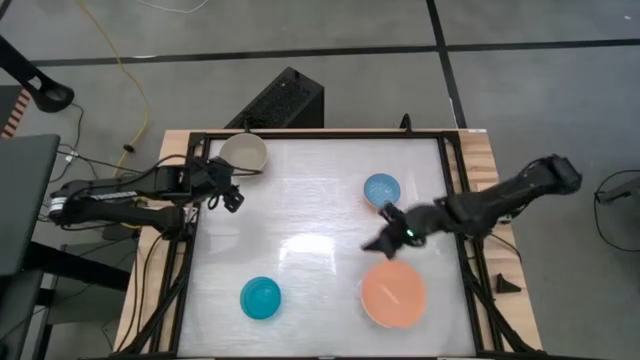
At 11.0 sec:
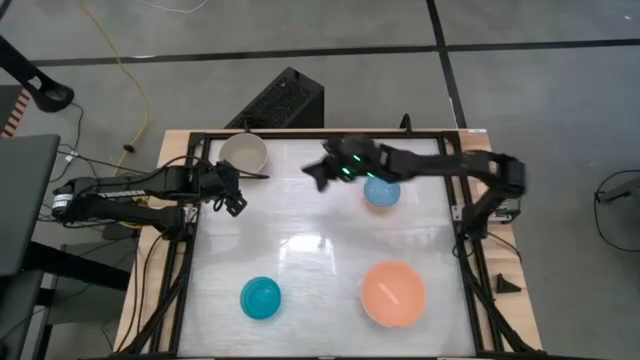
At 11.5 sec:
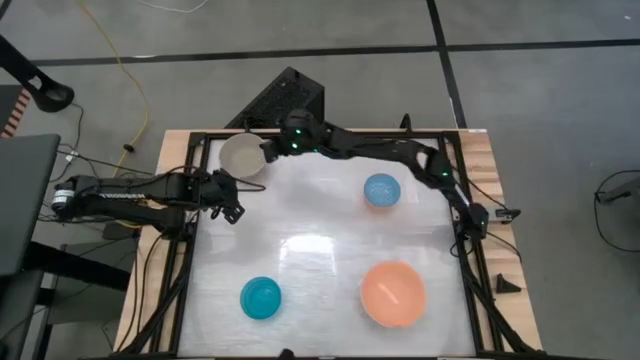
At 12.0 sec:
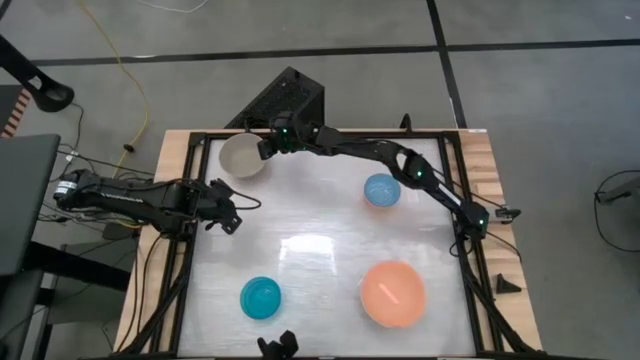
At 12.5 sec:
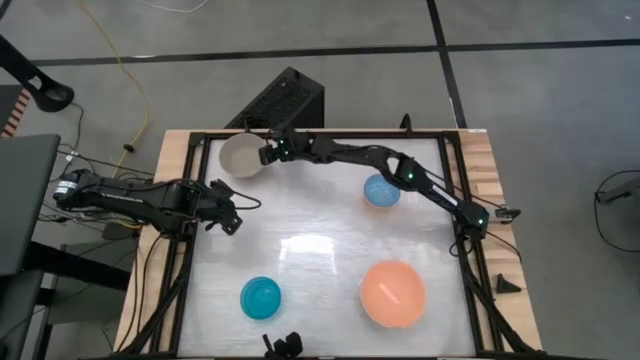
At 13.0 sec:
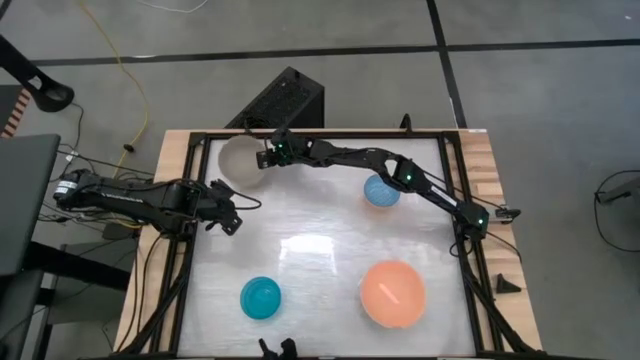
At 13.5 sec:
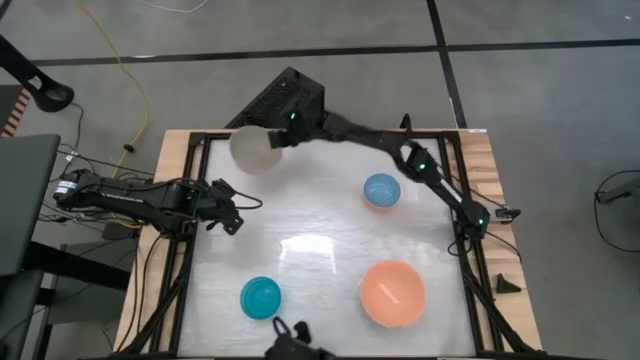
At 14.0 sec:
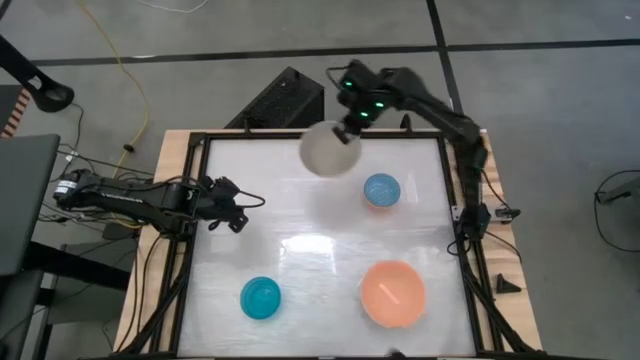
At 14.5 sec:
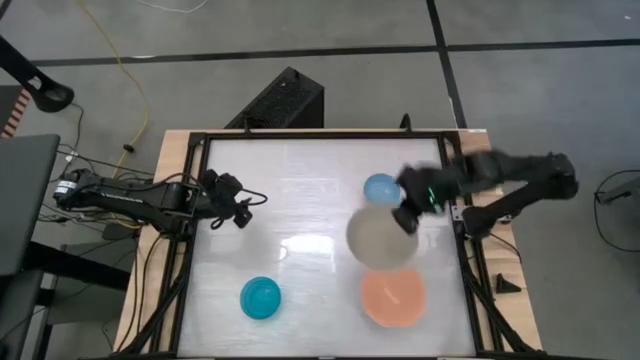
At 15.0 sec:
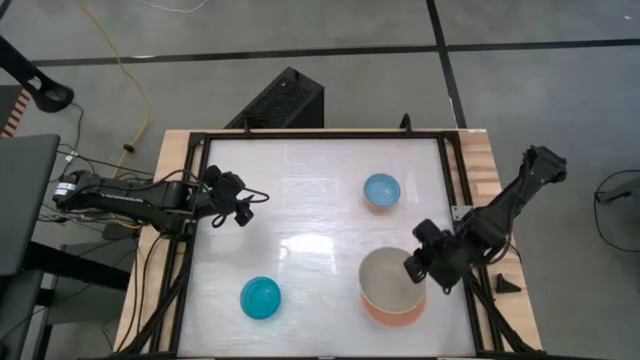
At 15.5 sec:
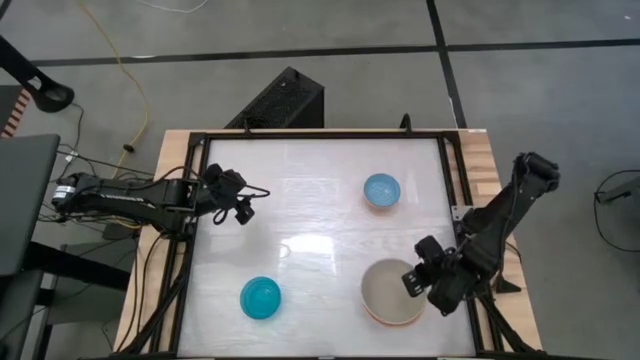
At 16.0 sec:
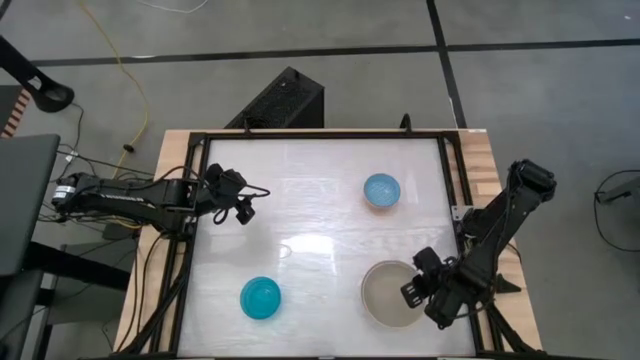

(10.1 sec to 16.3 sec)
Stack the gray bowl on top of the light orange bowl

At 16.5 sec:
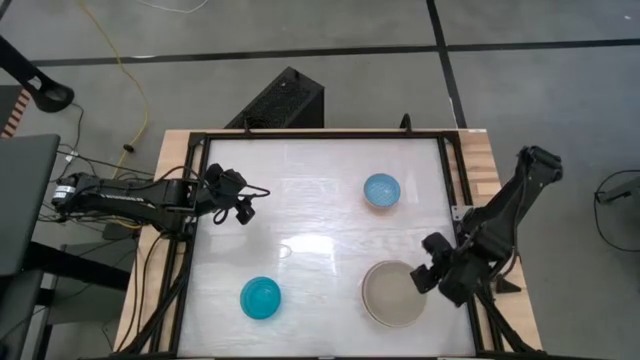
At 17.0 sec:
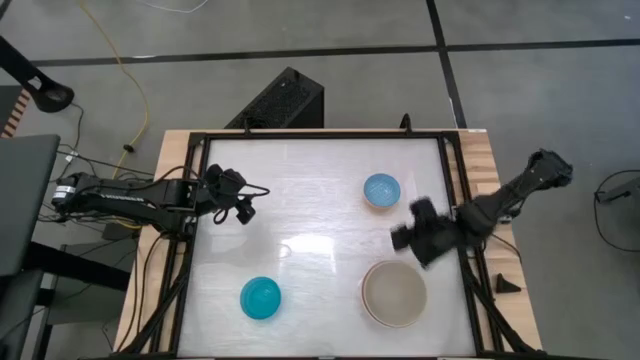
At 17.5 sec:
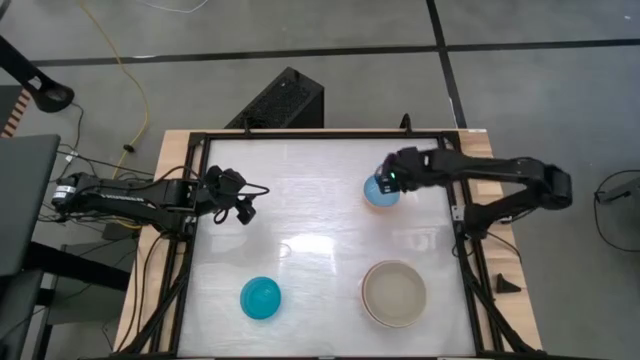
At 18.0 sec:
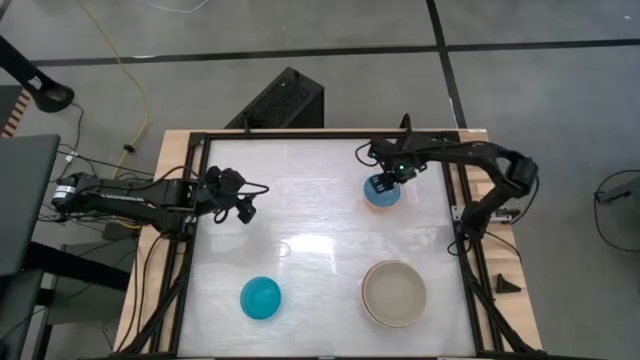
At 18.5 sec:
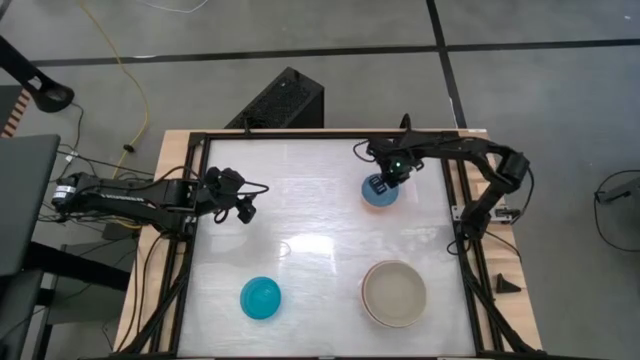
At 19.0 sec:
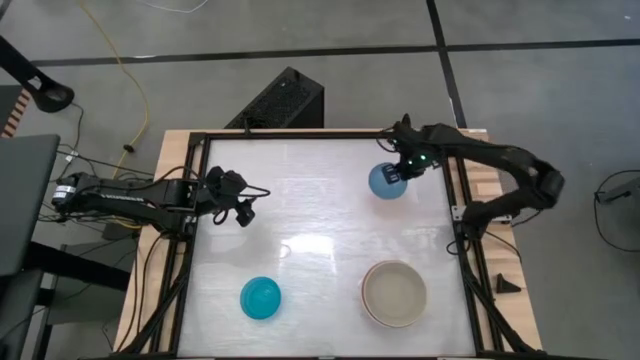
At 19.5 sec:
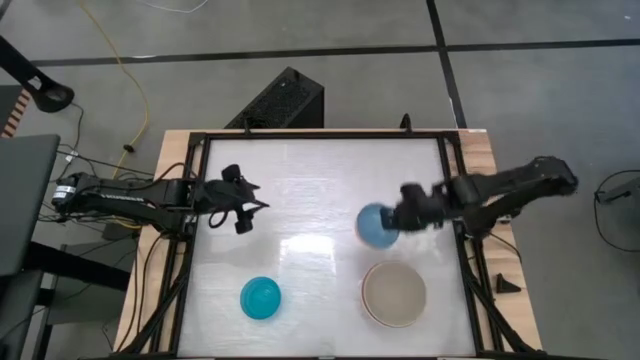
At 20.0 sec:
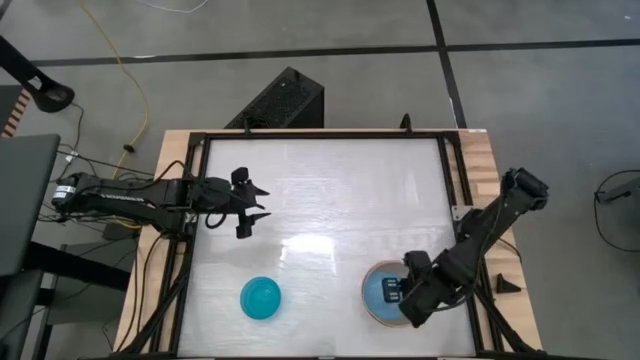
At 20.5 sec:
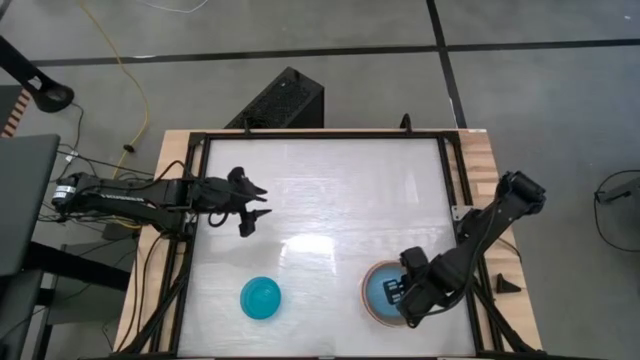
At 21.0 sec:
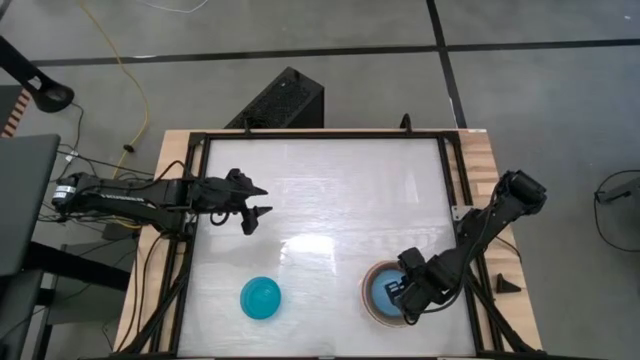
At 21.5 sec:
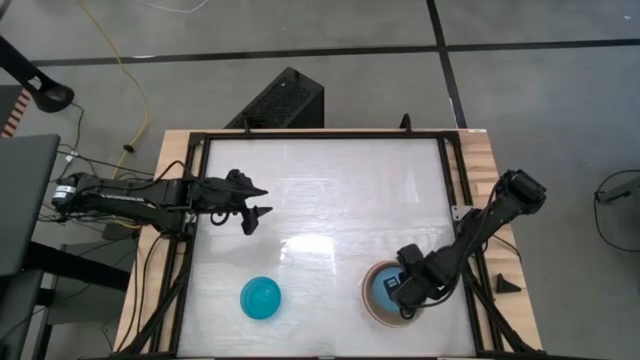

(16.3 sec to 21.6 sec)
Stack the blue patterned bowl on top of the gray bowl

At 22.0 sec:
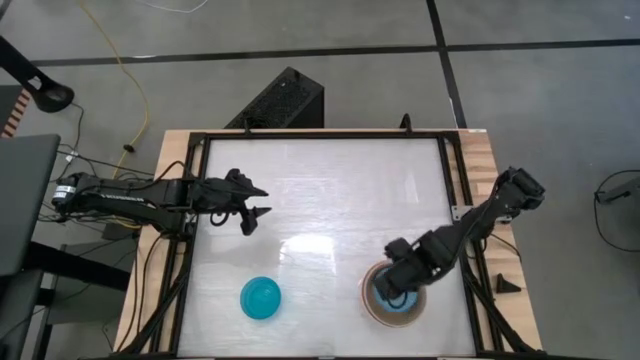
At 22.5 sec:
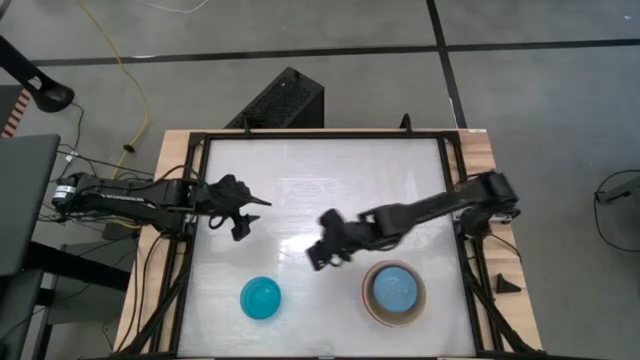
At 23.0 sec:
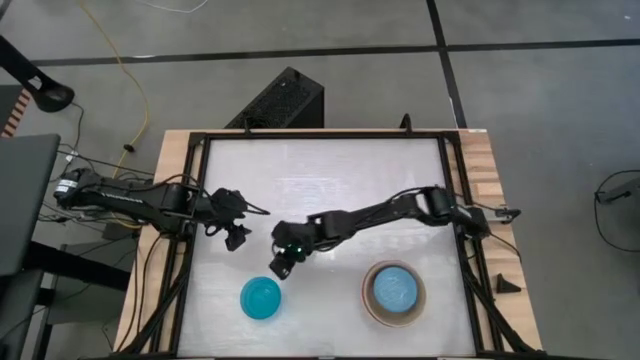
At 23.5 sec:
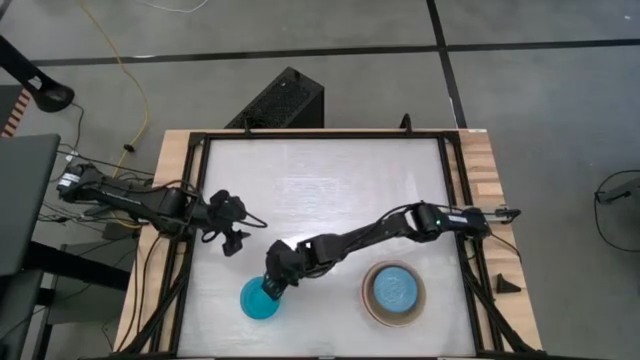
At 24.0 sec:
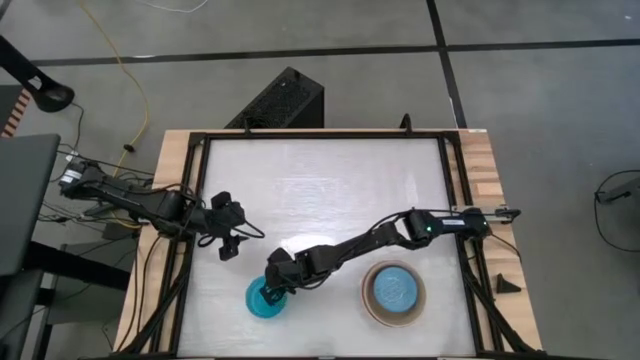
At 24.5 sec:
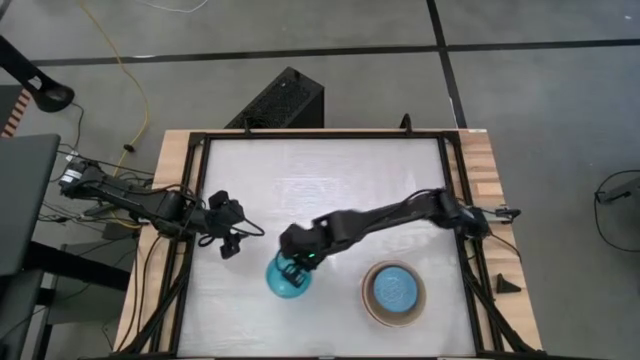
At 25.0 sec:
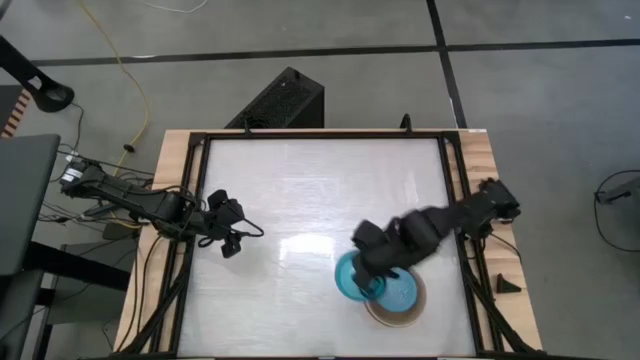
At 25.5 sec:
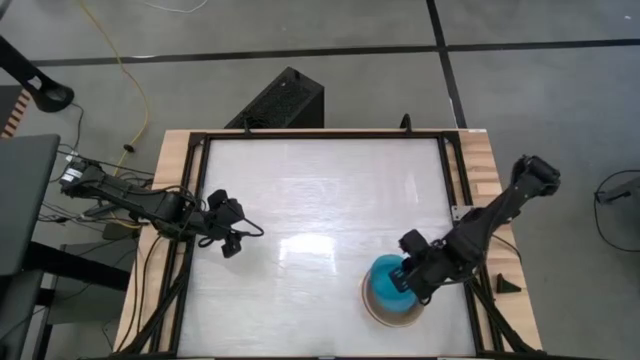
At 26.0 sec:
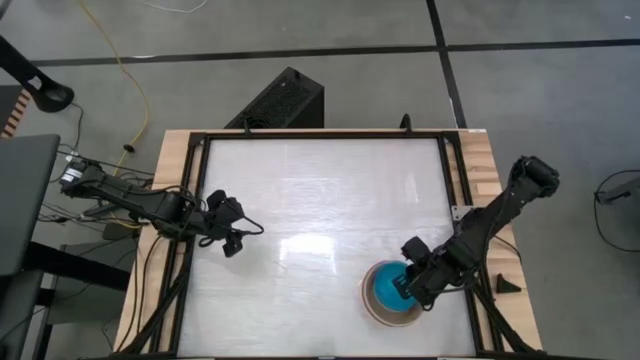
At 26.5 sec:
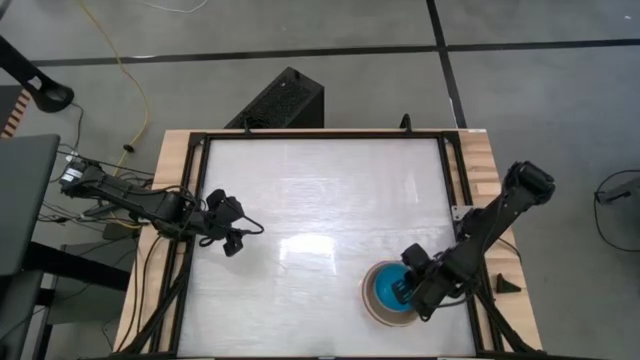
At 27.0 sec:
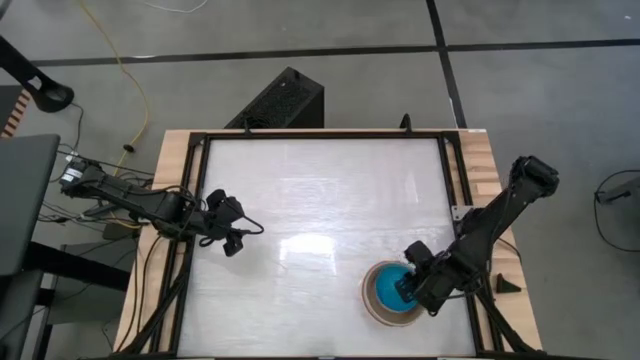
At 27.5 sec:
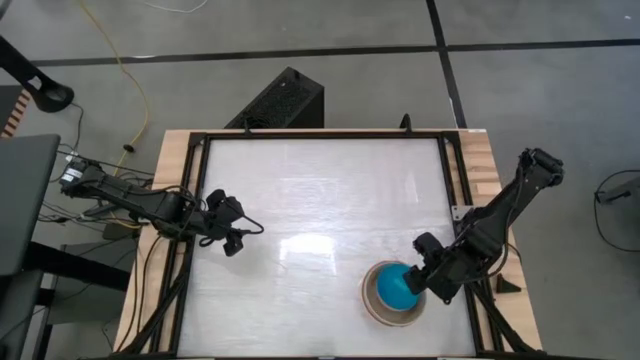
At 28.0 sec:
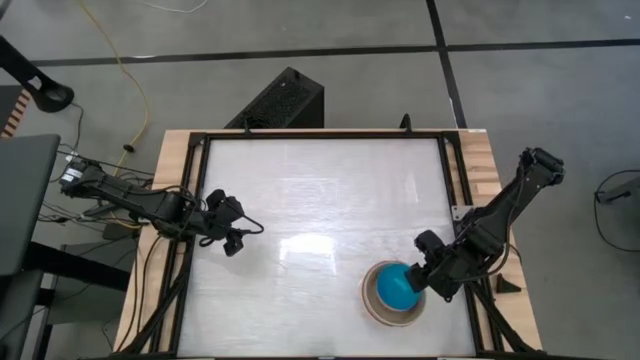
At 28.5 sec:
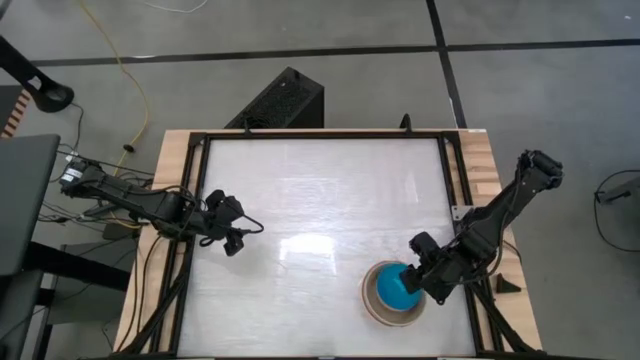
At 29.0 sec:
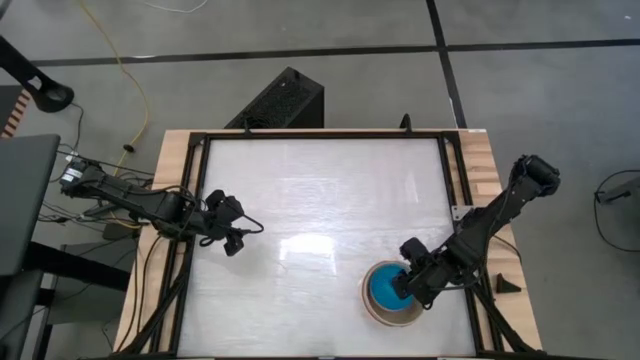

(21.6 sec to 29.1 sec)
Stack the blue bowl on top of the blue patterned bowl

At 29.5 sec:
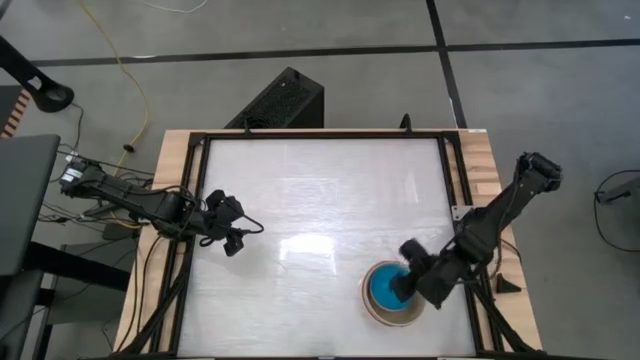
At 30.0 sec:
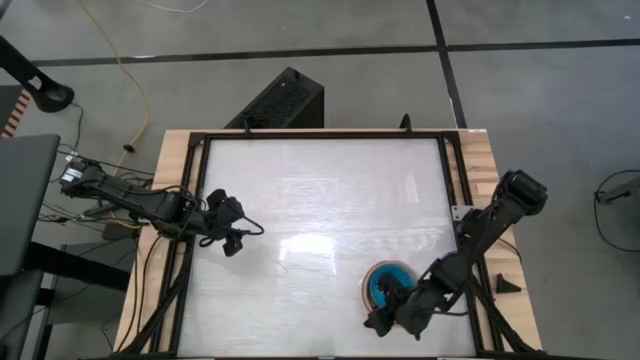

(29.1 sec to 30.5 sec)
Adjust the stacked bowls

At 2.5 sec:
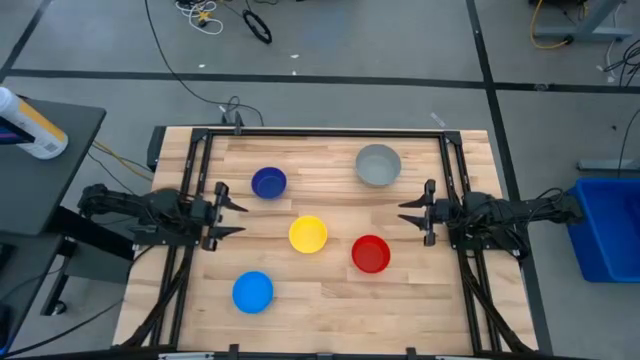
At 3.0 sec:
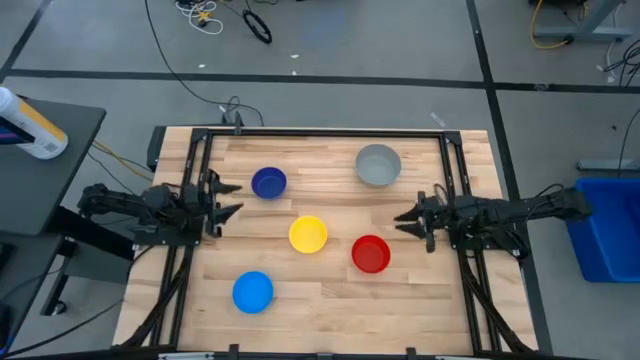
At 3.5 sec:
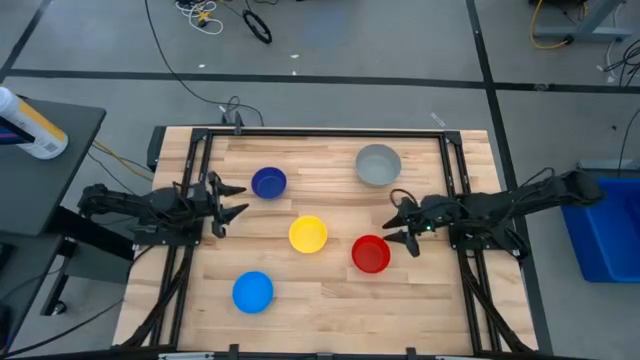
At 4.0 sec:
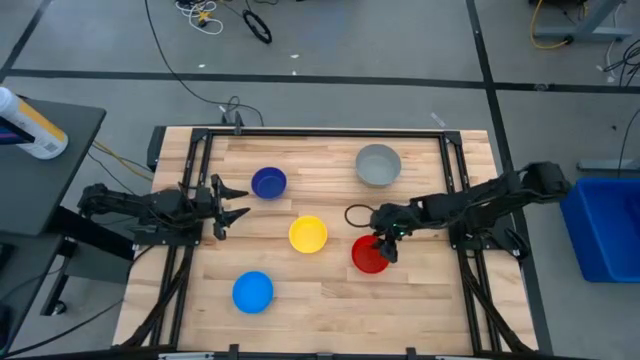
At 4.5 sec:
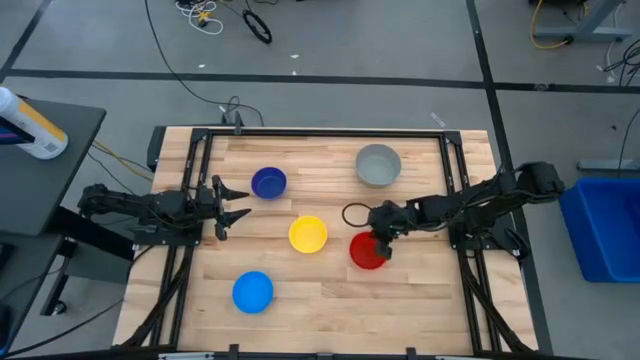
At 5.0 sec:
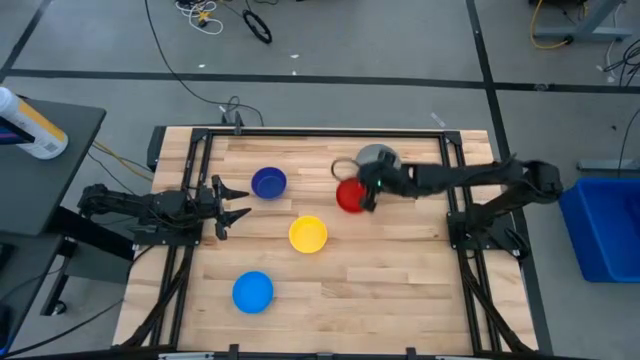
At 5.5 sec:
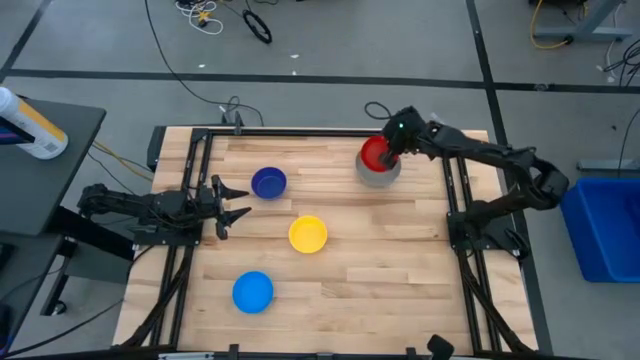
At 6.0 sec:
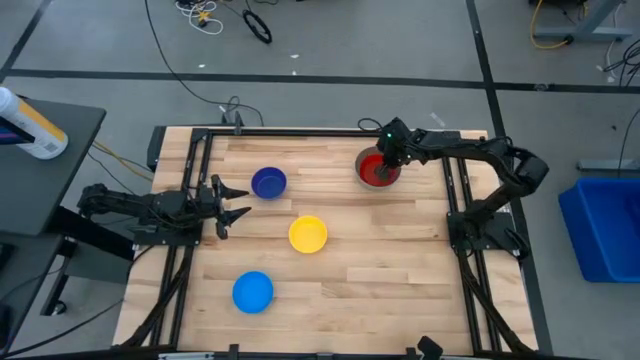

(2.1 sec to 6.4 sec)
Stack the orange bowl on the gray bowl
